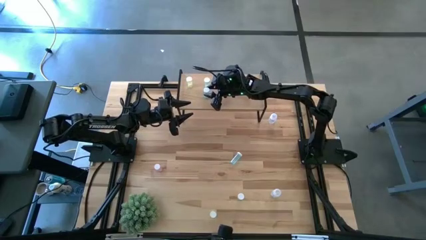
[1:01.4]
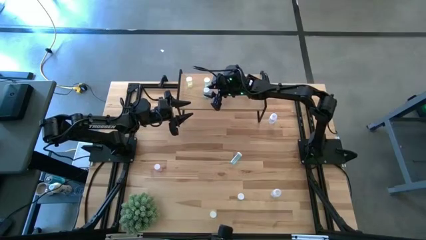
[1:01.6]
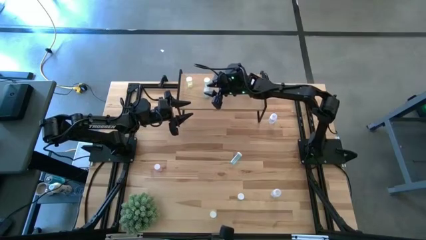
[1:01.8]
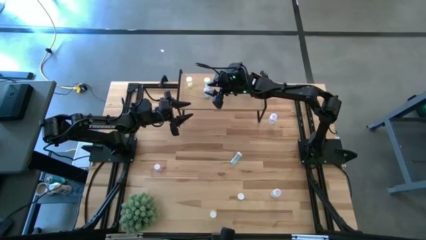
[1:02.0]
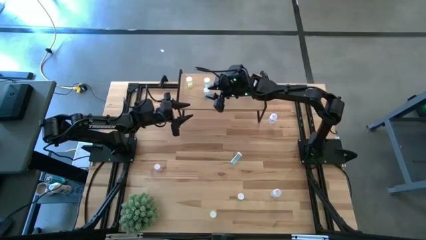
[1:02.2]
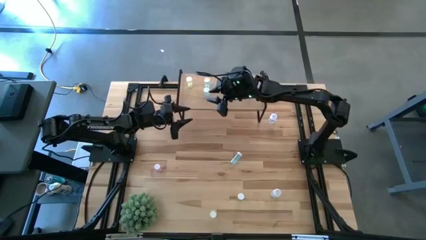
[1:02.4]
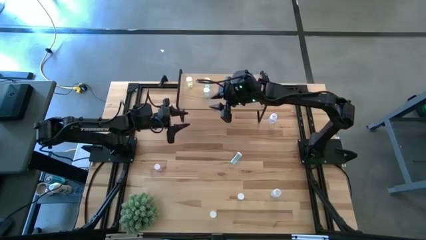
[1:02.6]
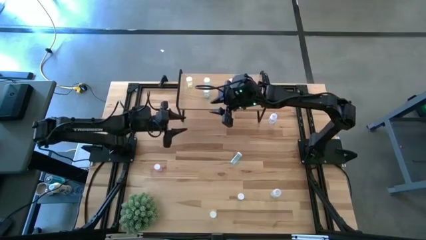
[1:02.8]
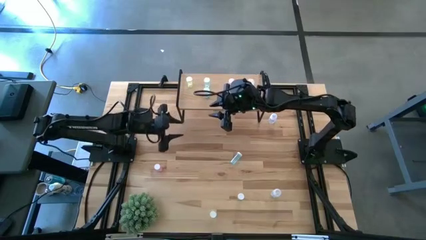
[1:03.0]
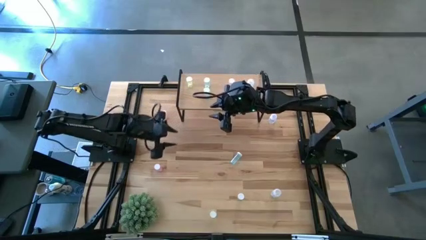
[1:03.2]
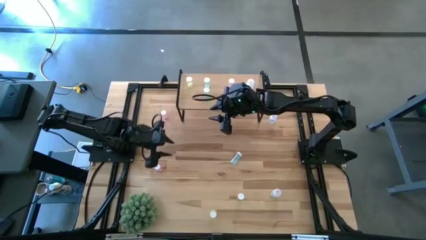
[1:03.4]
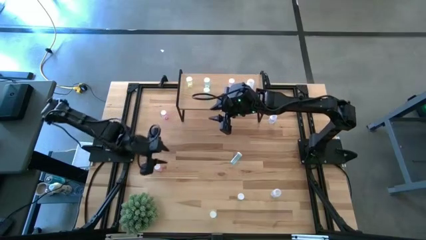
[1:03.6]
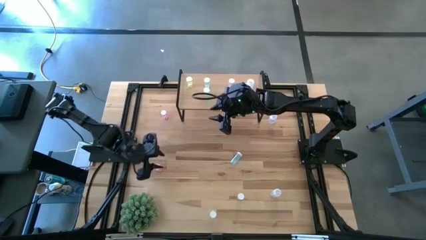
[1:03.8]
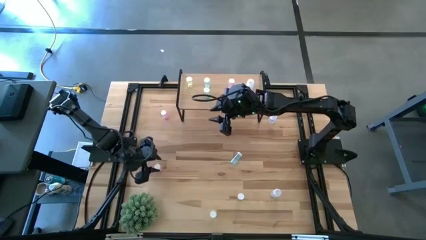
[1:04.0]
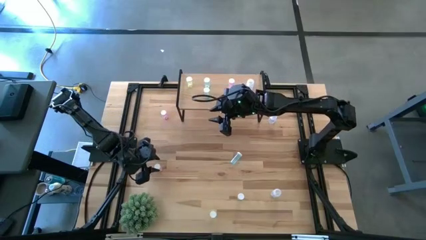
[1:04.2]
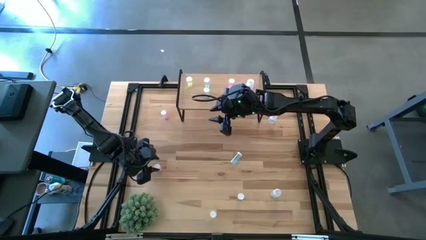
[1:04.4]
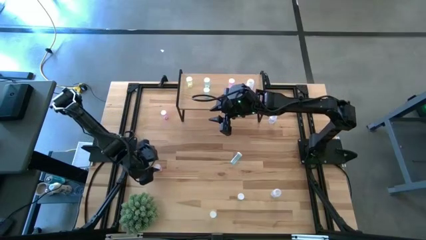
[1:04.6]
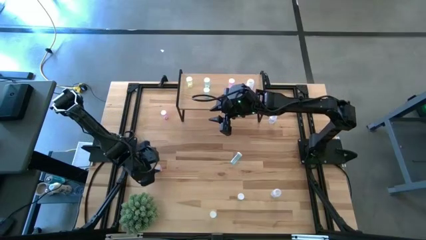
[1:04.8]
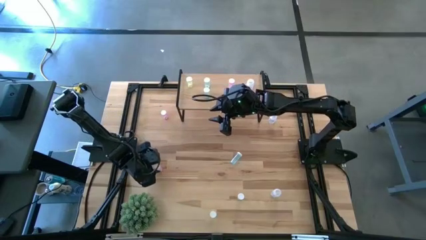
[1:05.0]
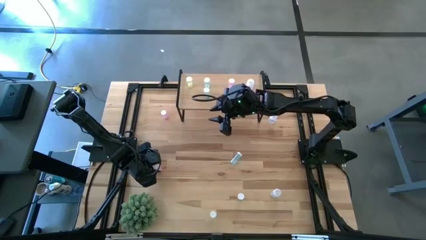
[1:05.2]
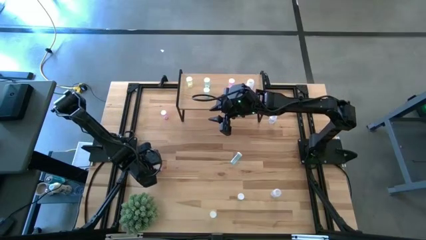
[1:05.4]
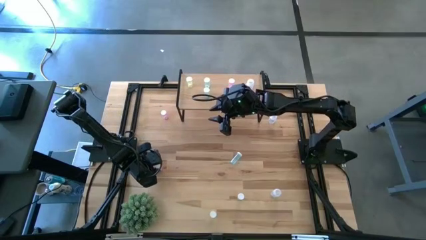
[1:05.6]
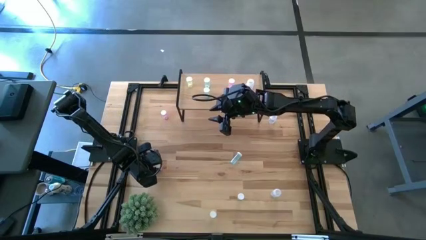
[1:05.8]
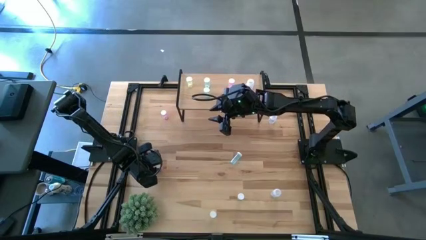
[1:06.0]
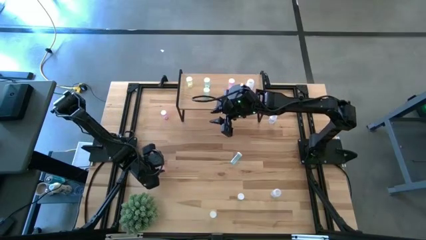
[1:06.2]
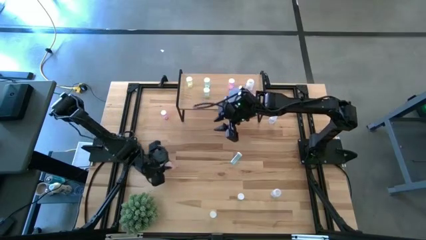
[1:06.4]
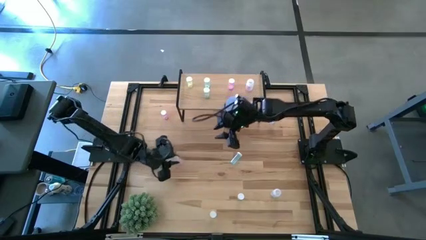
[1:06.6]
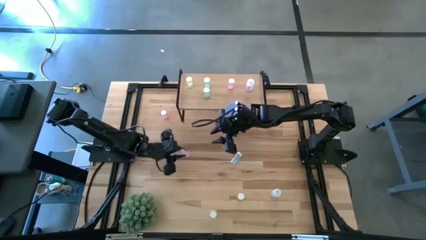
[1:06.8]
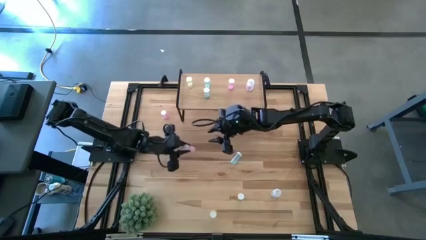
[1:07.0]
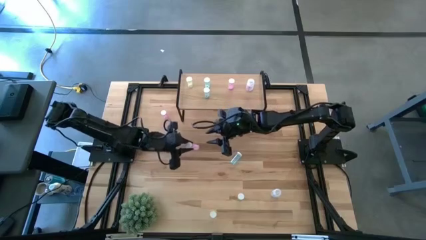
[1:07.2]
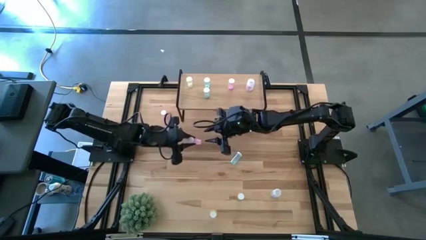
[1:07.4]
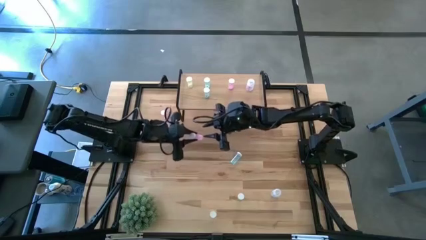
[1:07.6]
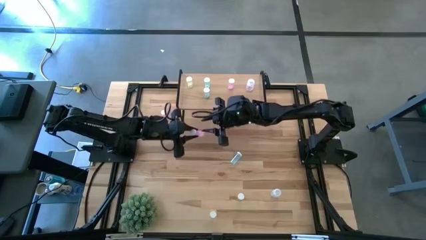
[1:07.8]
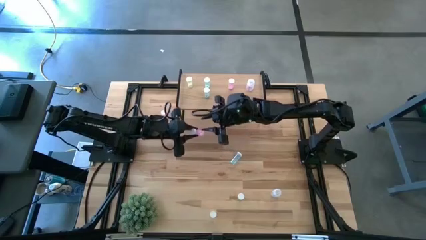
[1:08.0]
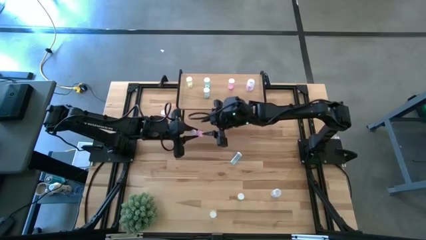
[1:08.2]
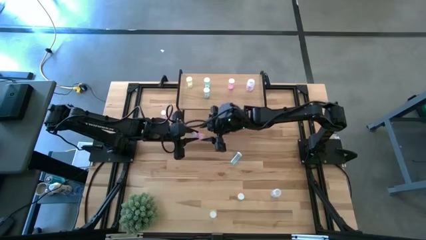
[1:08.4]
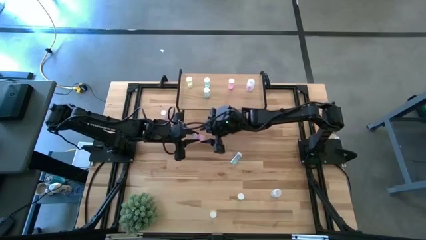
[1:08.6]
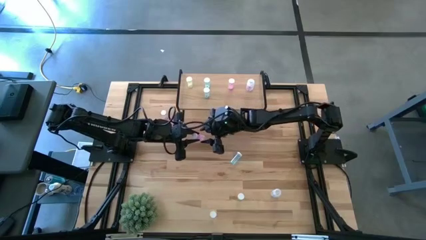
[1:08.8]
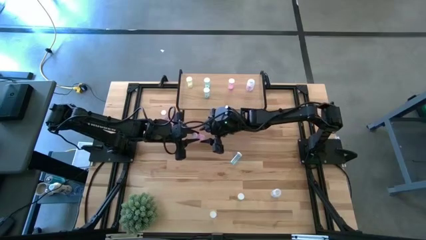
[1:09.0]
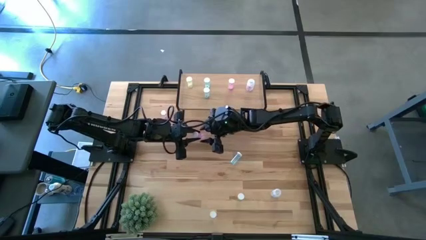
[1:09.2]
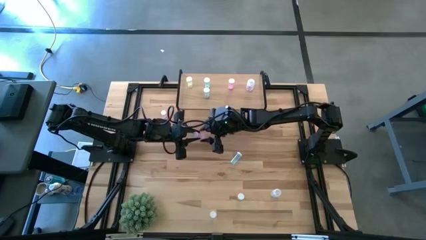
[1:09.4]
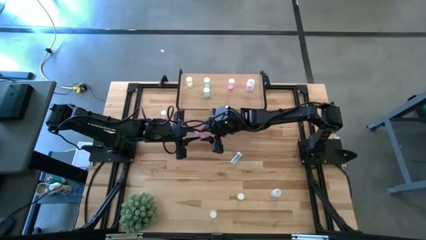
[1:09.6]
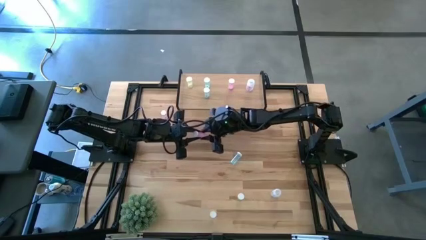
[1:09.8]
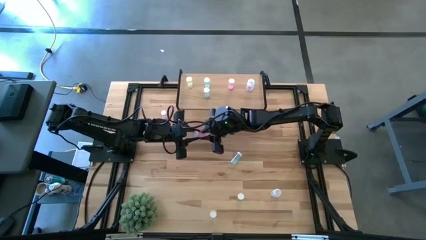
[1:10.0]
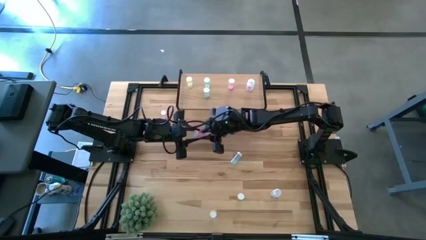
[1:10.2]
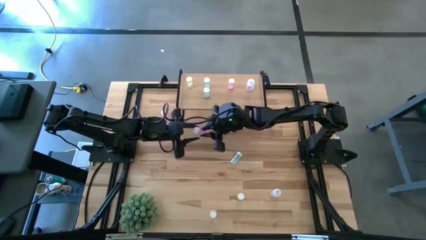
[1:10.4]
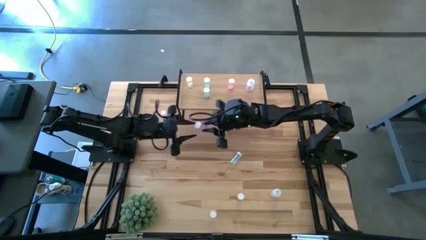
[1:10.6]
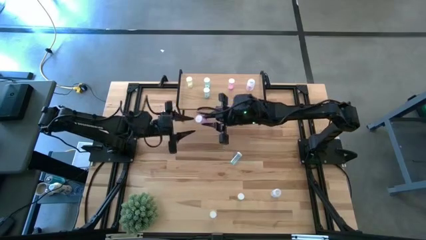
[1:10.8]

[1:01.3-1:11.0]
Task: Pick and place medicine bottles onto shelf by color
Put the bottom pink pill bottle and align it with the other pink bottle on the shelf

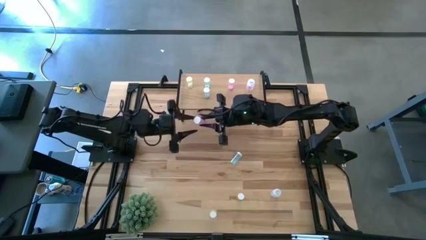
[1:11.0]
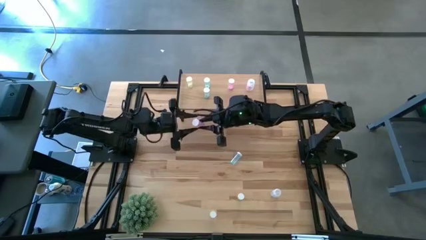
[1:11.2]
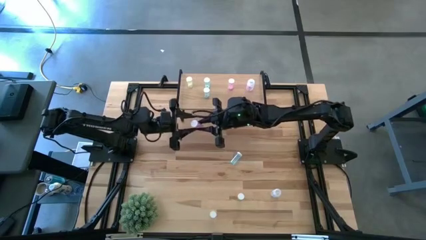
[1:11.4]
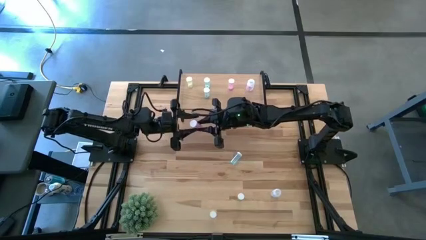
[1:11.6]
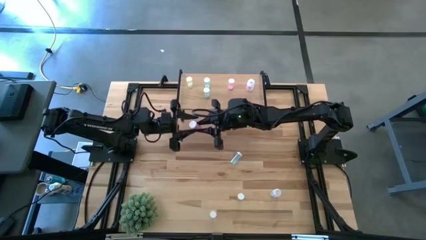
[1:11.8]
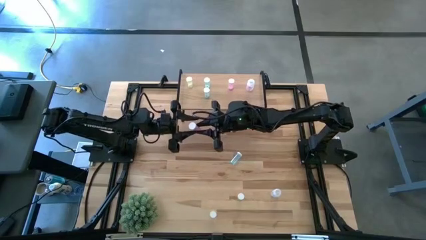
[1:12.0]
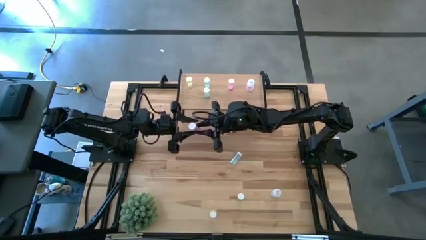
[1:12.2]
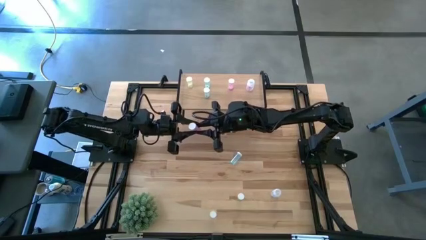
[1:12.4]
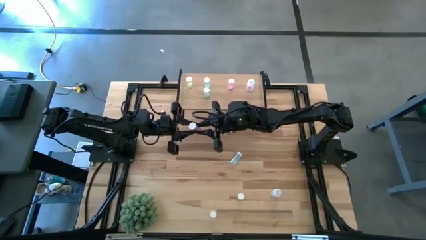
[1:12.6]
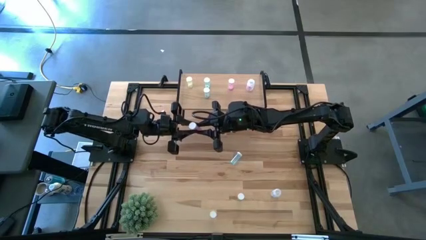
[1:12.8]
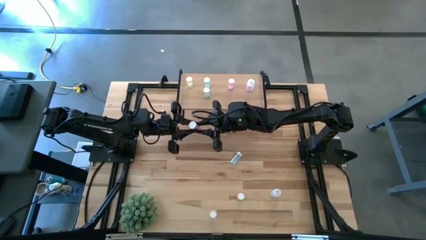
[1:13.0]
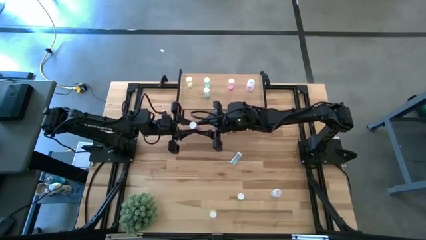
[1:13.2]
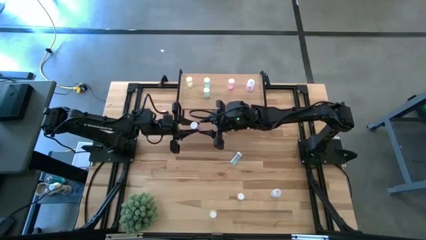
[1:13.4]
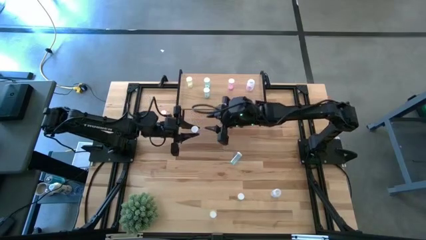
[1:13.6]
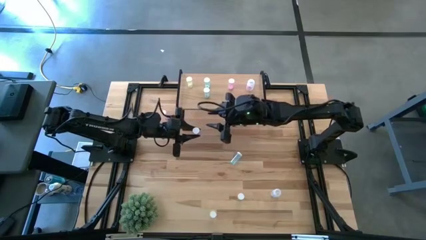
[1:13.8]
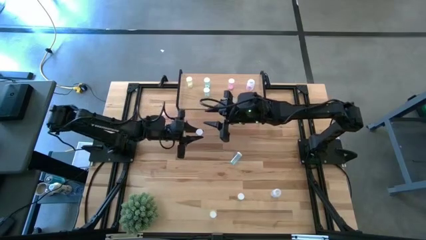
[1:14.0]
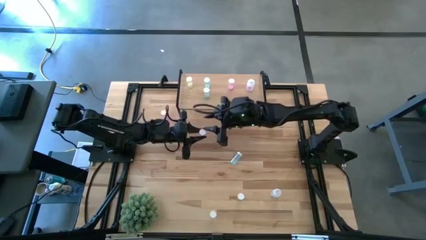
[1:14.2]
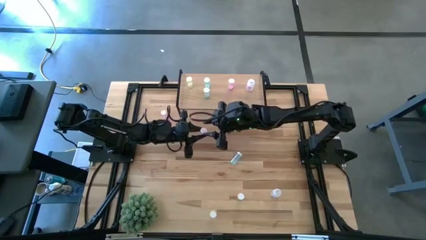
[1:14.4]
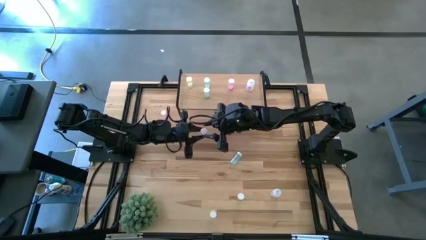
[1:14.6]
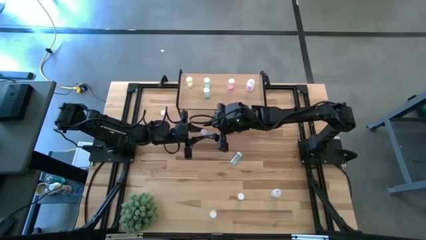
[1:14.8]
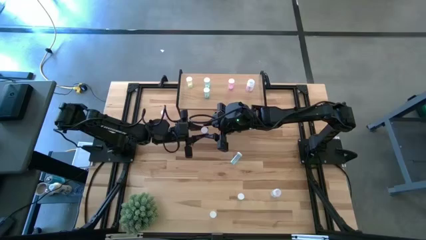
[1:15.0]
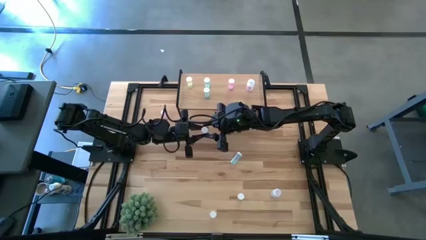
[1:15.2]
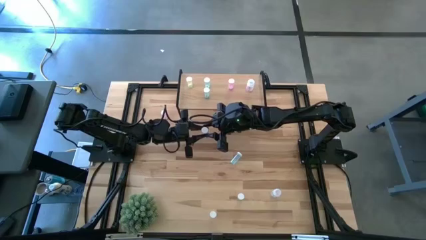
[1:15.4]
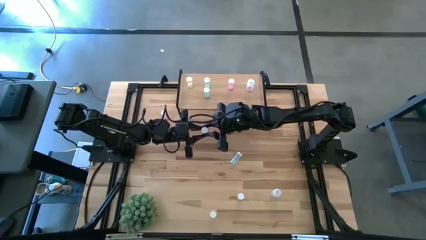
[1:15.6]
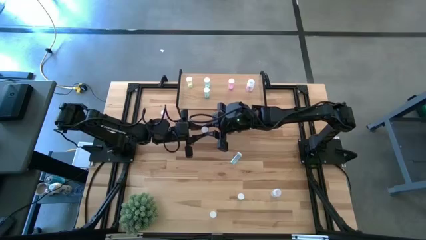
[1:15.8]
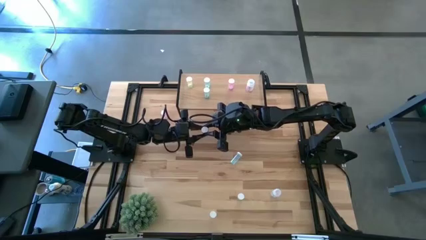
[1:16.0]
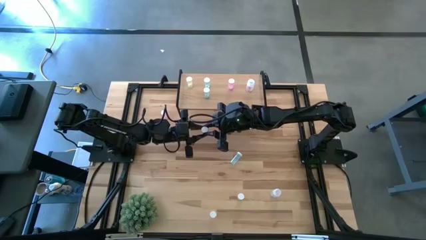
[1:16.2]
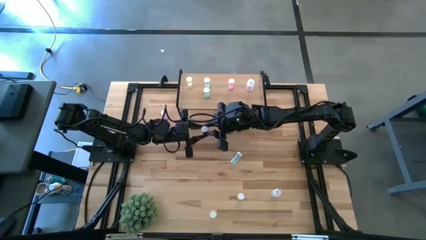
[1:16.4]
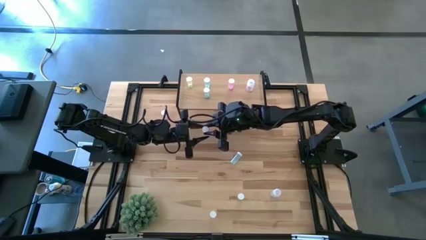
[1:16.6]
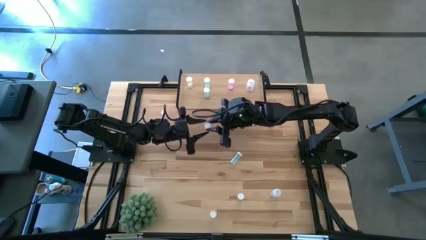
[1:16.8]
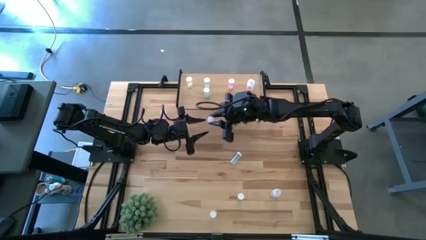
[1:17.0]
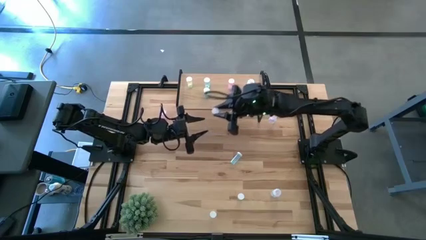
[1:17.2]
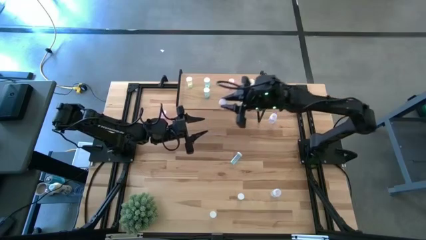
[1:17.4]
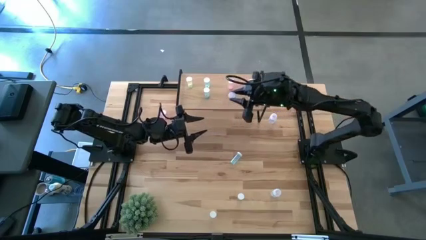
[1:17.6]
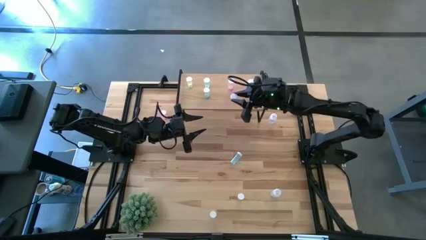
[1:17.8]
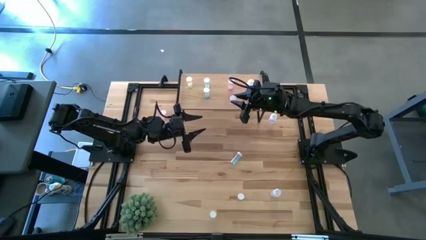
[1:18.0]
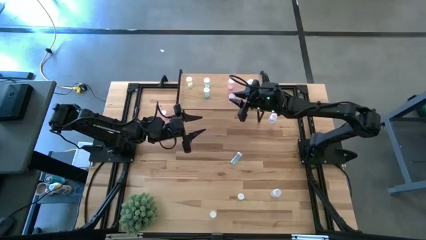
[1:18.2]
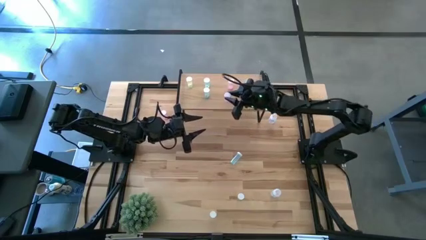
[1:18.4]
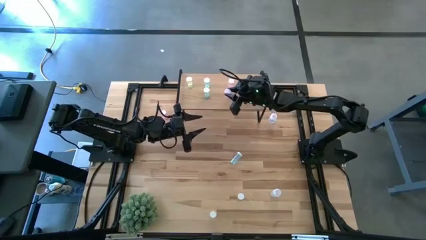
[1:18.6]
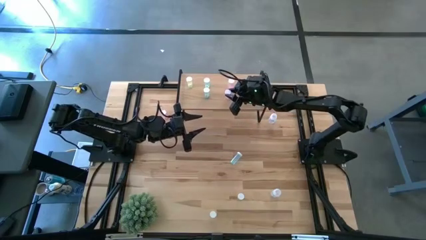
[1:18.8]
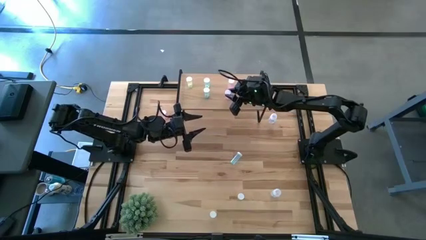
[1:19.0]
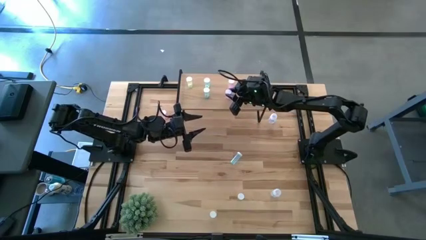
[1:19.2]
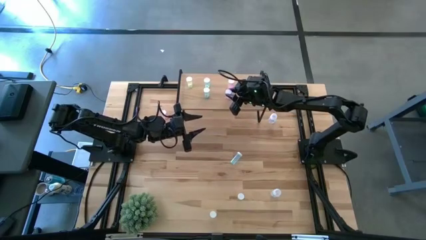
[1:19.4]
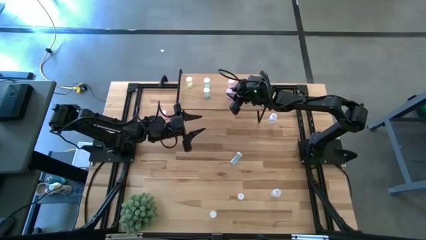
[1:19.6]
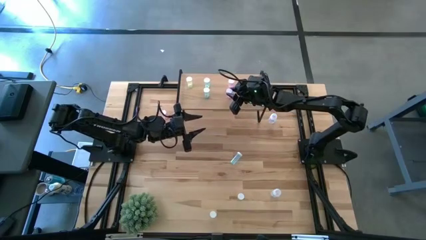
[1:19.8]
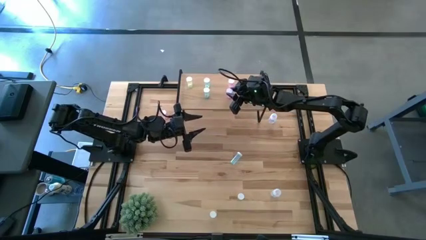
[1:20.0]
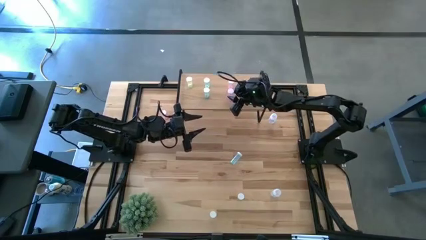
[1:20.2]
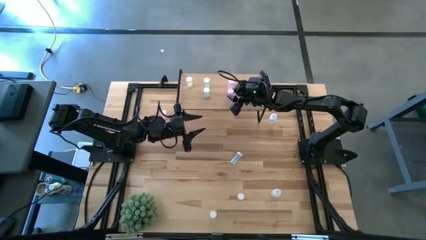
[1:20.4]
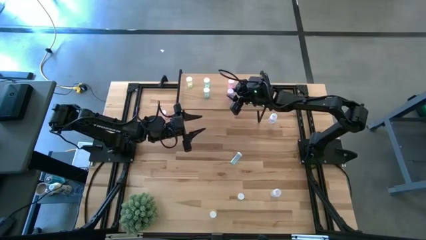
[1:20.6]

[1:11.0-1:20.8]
Put the bottom pink pill bottle and align it with the other pink bottle on the shelf
